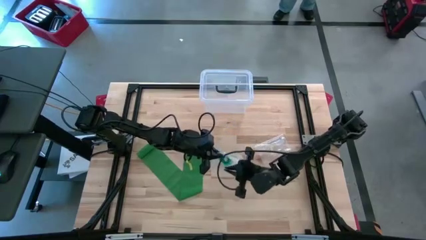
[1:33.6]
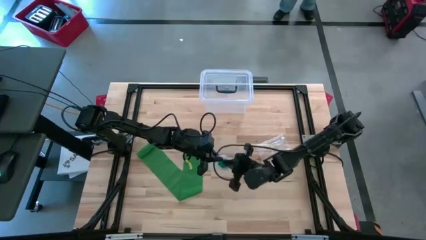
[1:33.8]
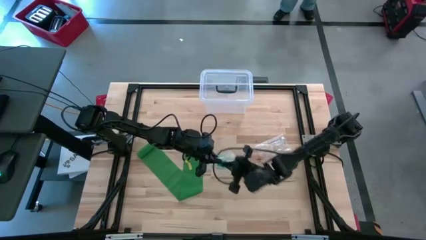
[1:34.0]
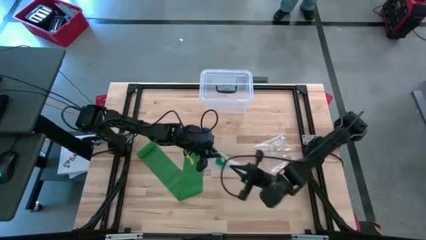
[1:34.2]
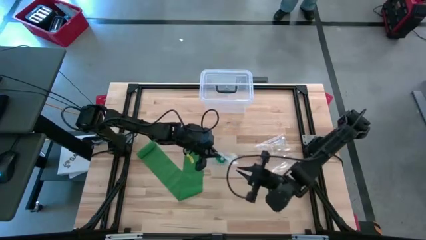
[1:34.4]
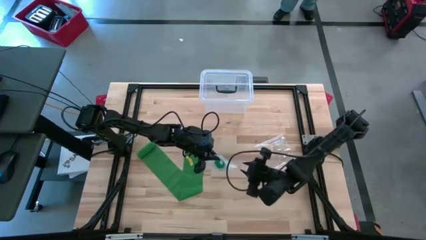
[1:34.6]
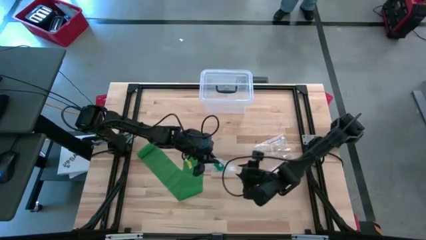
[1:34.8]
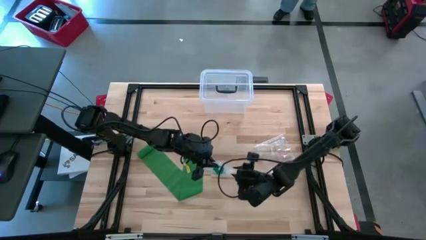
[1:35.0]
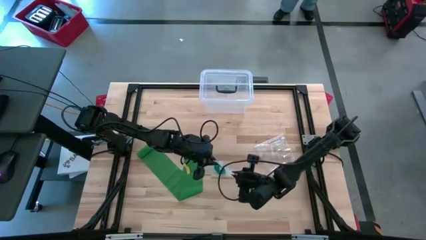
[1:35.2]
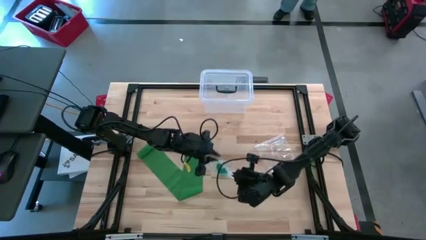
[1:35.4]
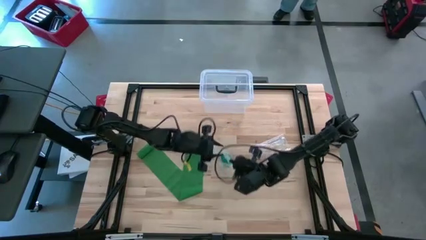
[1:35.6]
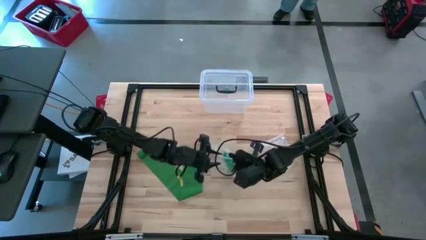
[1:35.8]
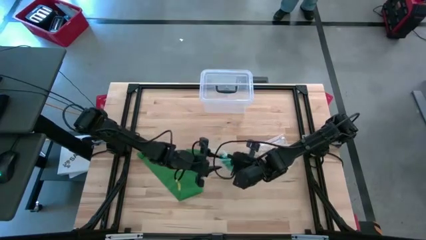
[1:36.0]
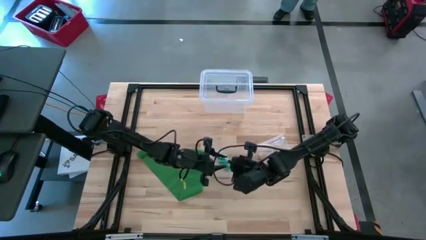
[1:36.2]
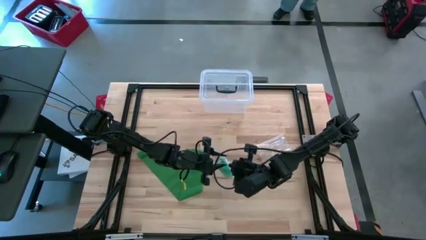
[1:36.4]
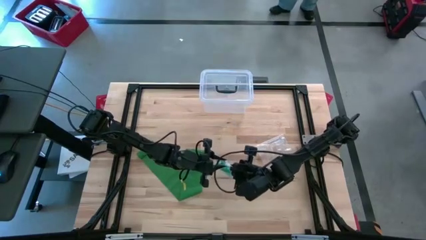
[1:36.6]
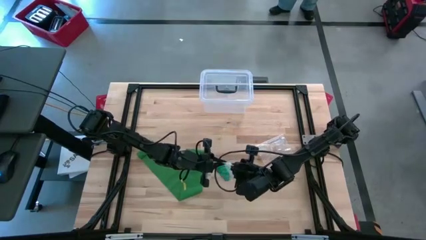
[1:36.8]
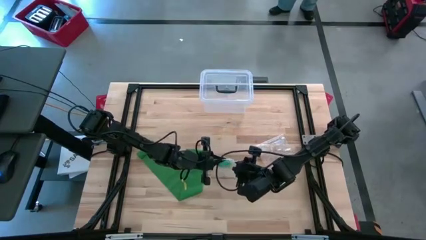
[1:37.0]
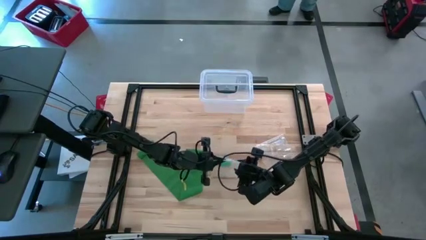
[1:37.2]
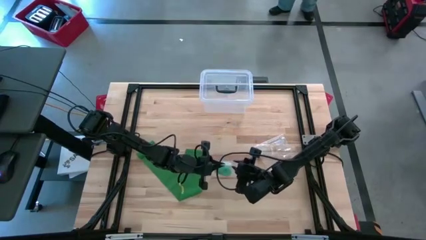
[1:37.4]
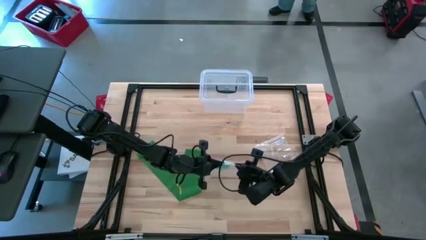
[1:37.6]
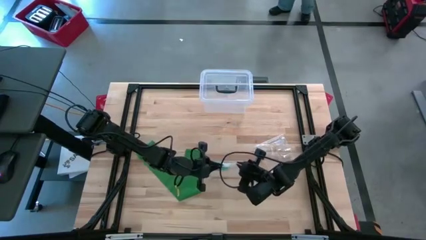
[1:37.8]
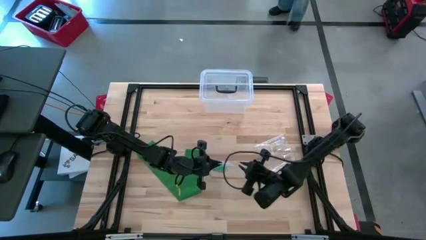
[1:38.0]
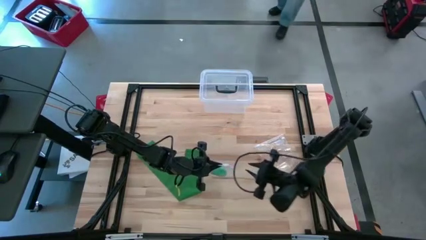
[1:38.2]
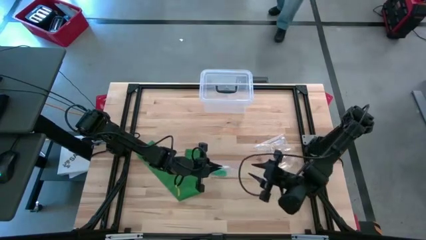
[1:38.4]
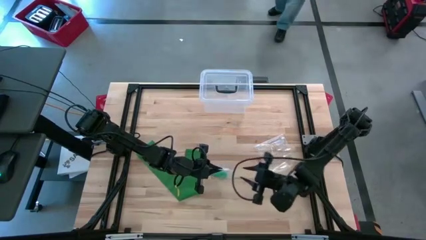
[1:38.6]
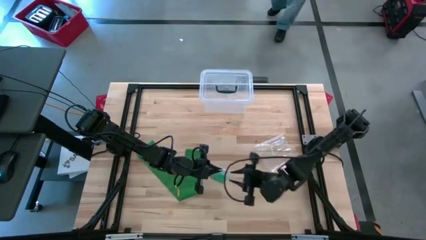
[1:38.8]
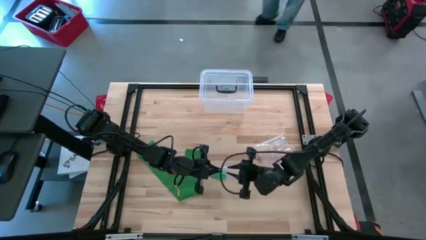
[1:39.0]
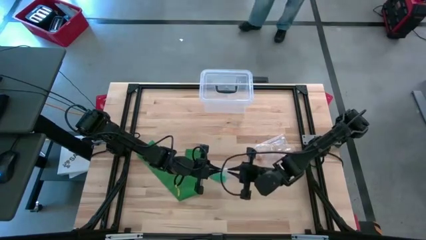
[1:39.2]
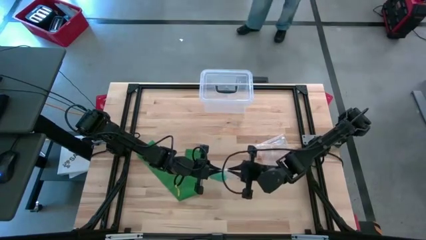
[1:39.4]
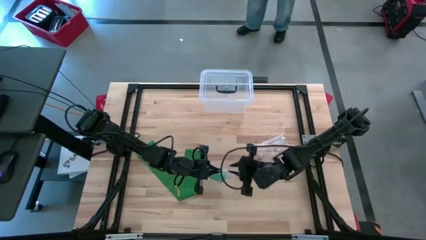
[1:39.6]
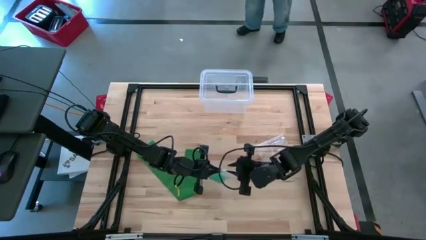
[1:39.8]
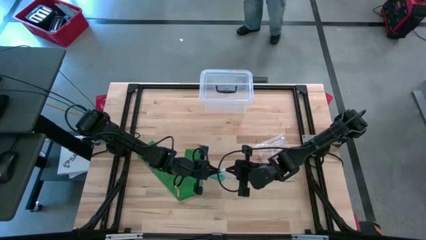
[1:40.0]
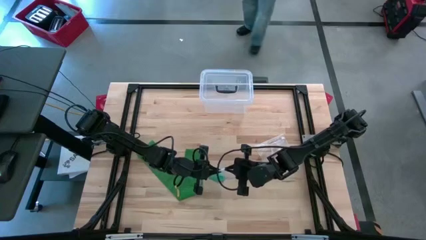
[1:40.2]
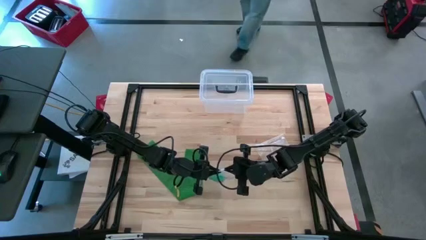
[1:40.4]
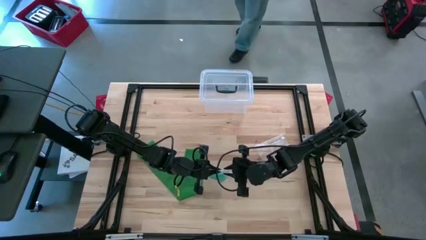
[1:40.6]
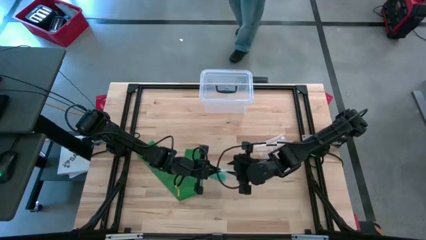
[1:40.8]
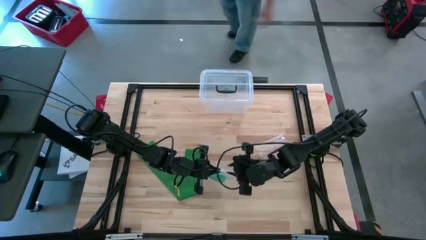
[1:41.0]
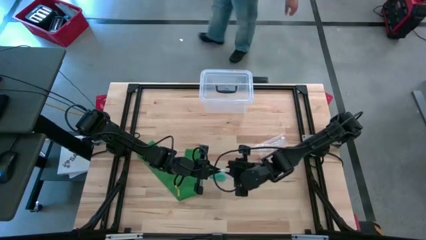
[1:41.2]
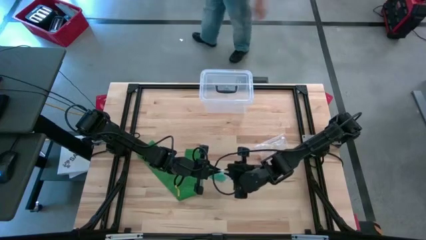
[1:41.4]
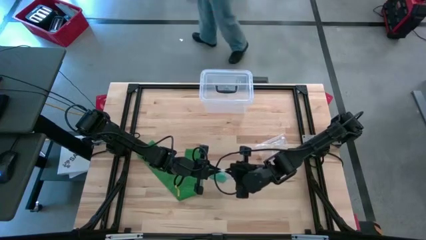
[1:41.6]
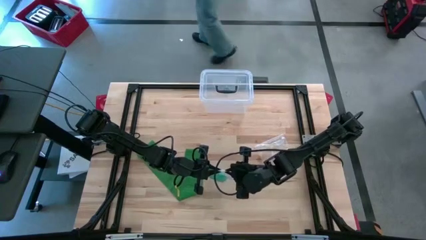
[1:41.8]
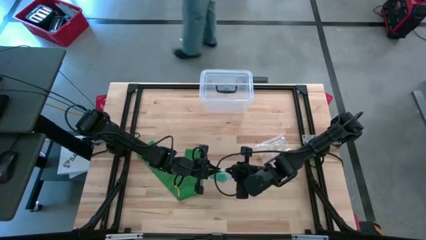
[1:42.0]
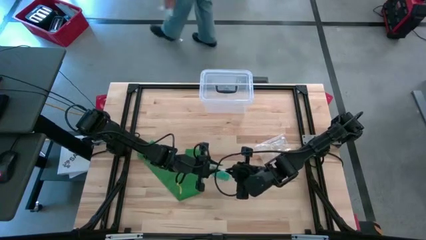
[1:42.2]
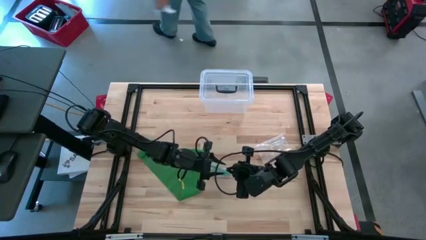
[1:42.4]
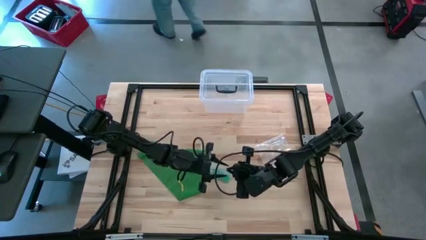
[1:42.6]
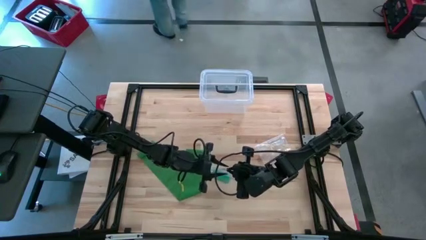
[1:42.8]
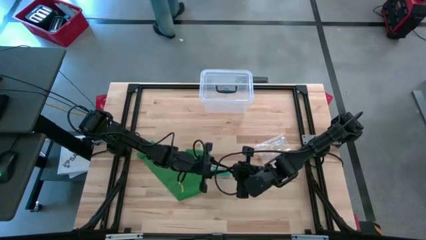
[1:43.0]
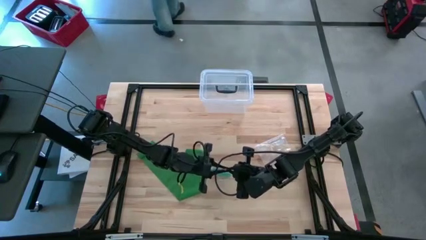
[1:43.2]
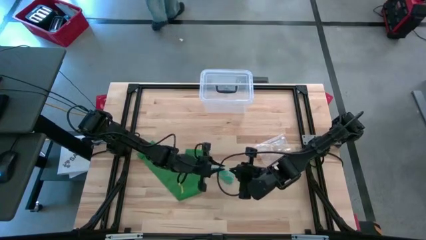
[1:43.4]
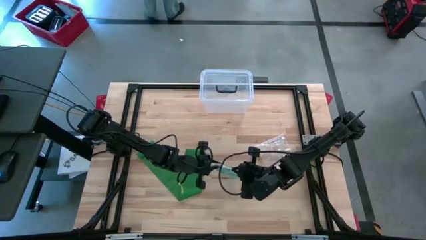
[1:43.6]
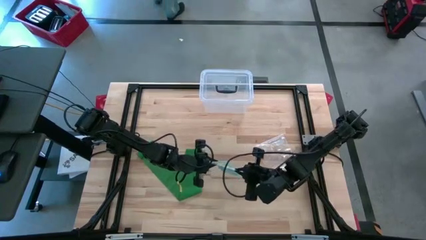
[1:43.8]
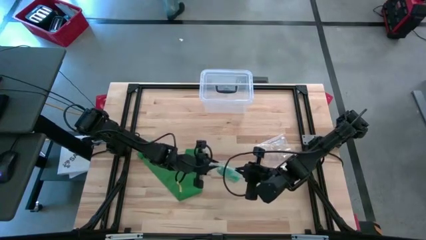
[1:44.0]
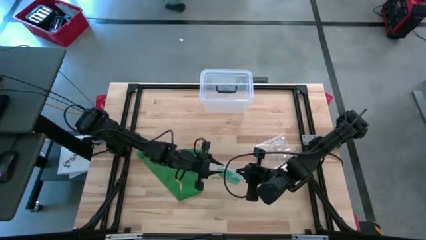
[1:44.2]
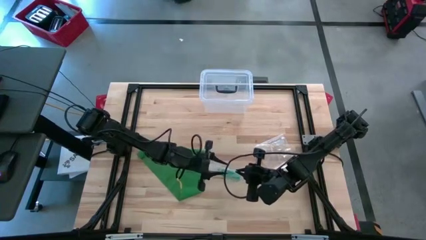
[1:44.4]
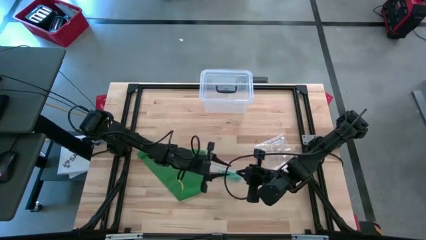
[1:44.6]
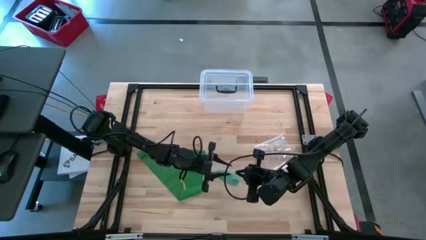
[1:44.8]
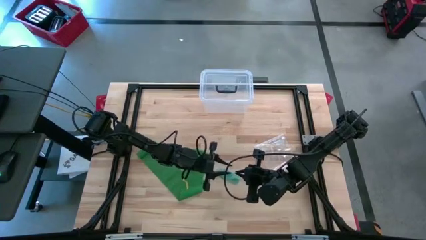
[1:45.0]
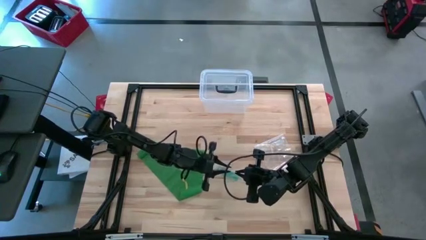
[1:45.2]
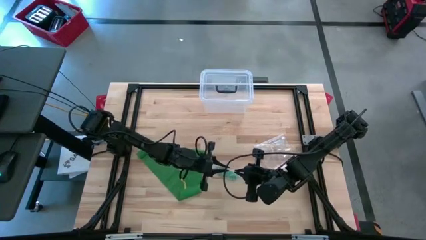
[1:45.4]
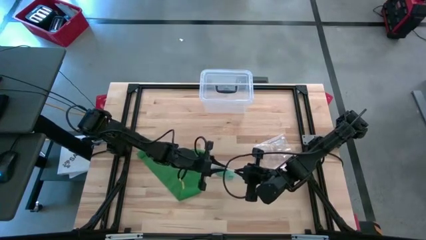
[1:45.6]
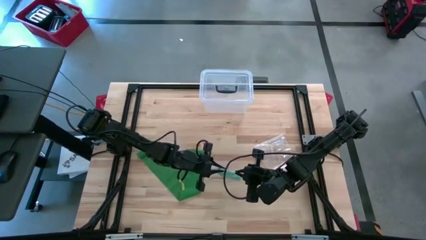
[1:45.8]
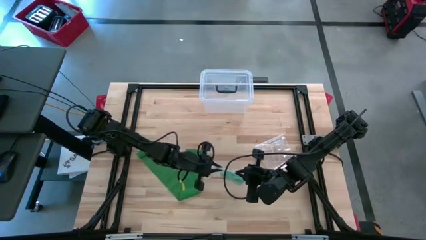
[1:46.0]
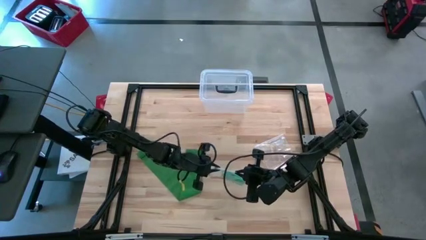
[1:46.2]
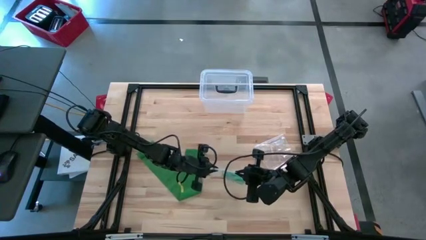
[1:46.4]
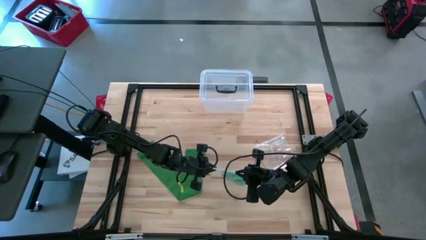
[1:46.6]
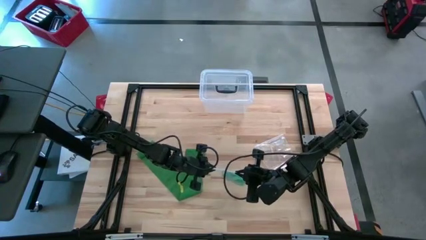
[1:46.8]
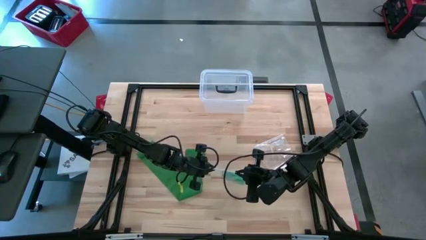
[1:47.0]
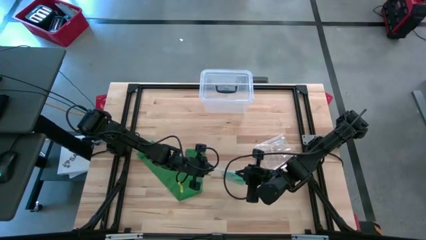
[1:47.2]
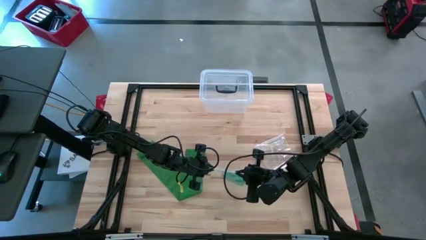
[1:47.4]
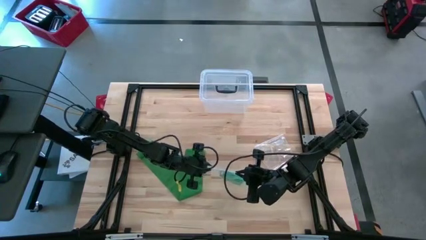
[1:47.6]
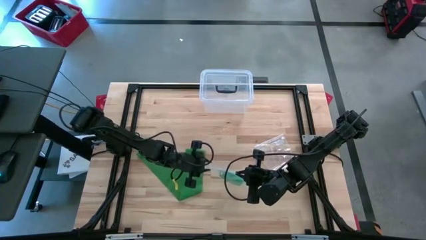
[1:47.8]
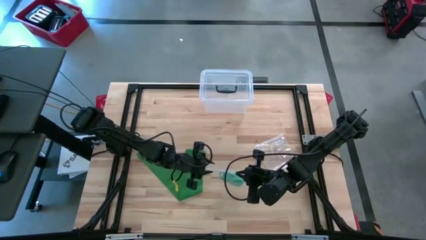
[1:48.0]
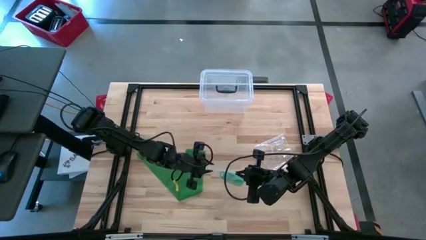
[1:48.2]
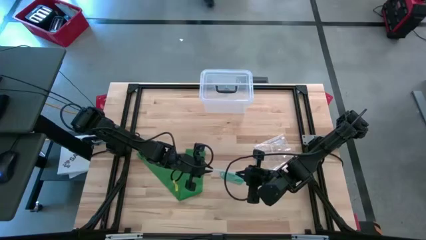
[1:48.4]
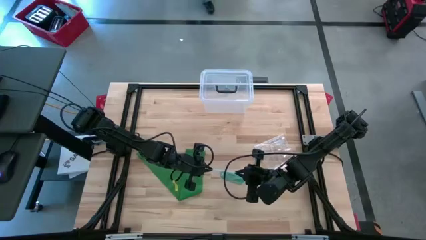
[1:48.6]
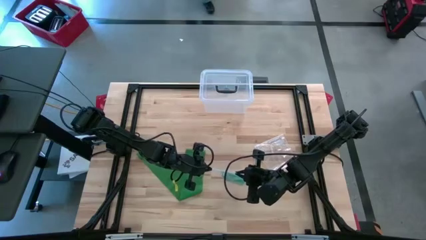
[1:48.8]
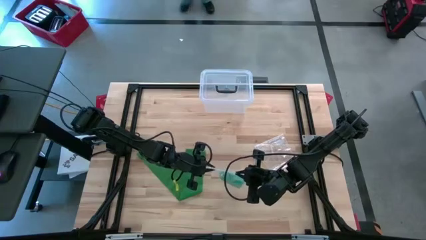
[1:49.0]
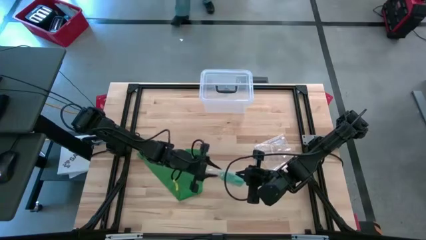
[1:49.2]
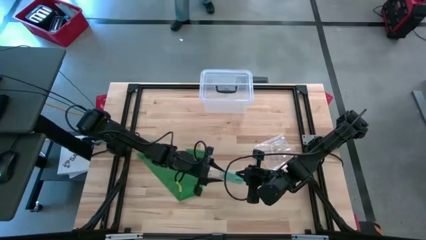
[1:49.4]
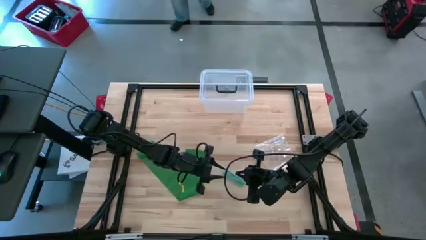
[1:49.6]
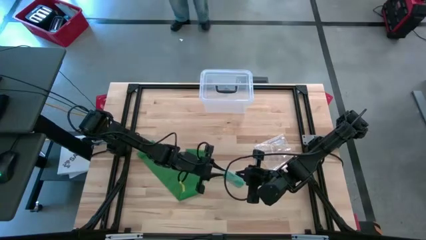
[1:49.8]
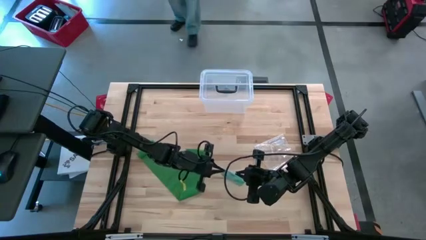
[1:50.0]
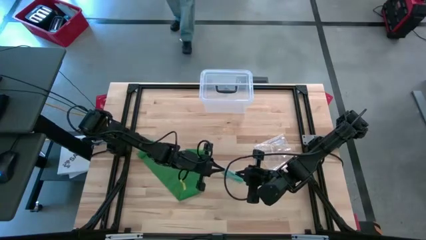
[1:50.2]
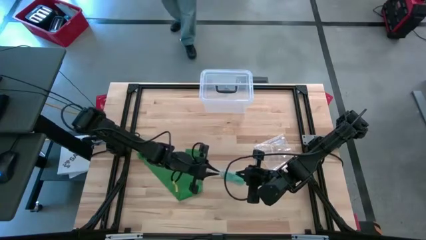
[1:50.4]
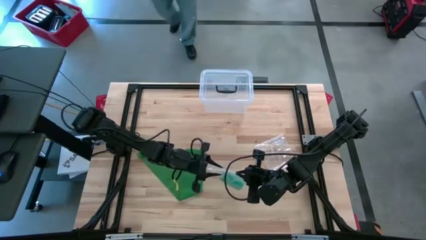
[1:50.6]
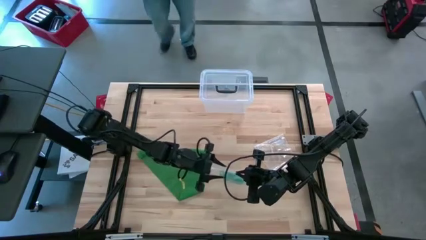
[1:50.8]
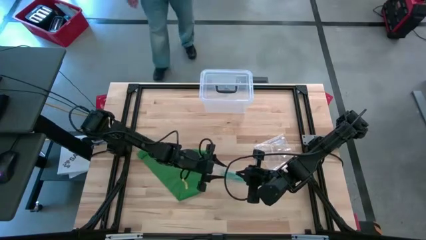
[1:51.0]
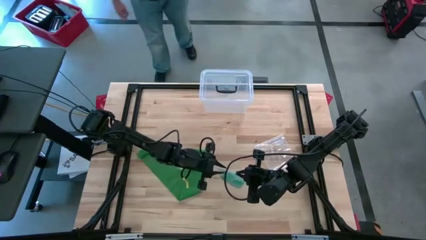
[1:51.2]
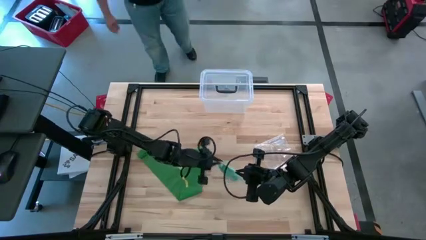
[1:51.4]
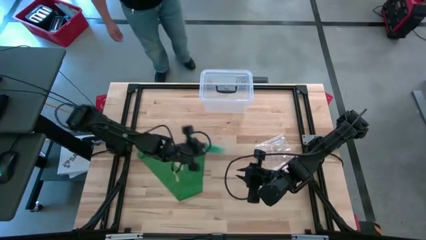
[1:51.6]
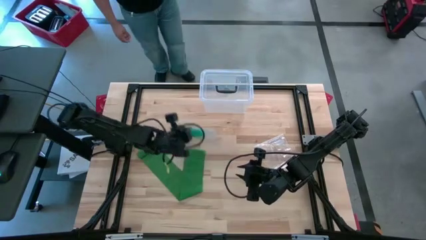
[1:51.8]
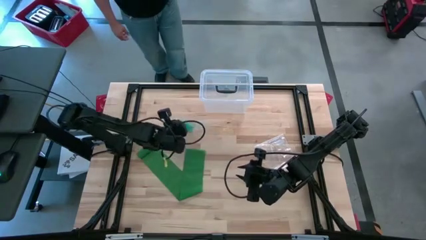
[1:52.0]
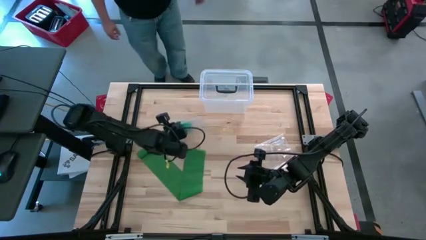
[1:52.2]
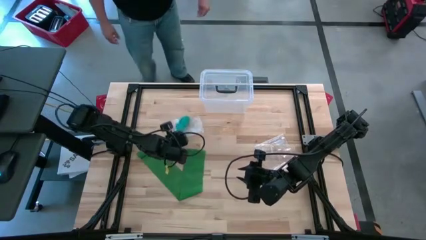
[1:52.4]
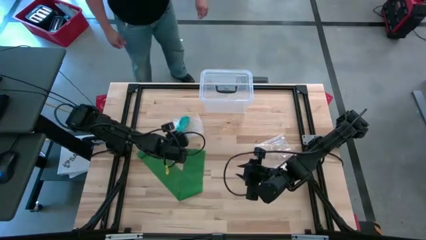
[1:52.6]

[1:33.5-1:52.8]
Task: Roll bandage
Close the transparent zip bag containing the blue bandage
